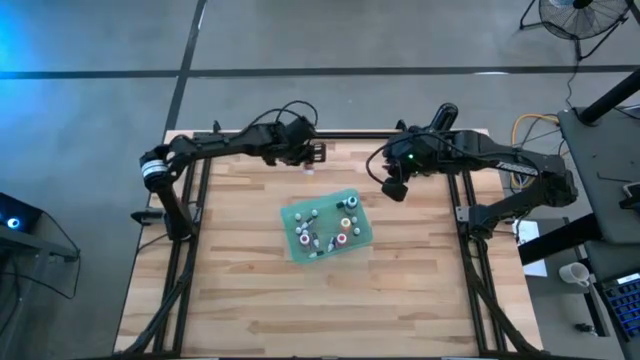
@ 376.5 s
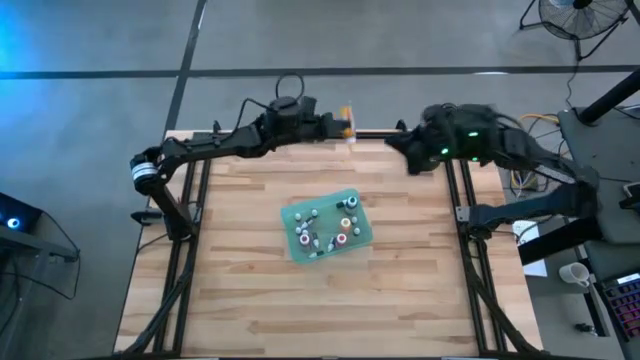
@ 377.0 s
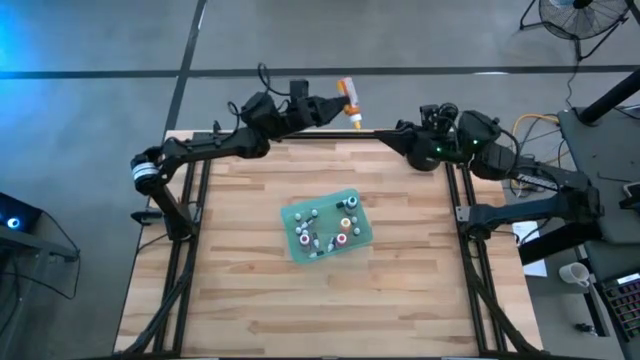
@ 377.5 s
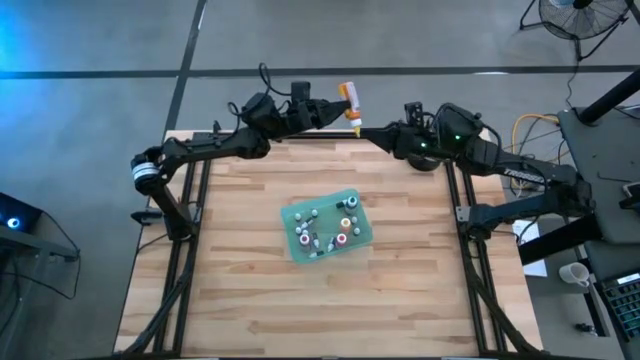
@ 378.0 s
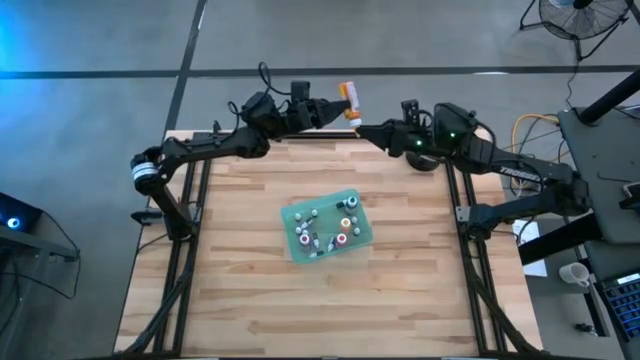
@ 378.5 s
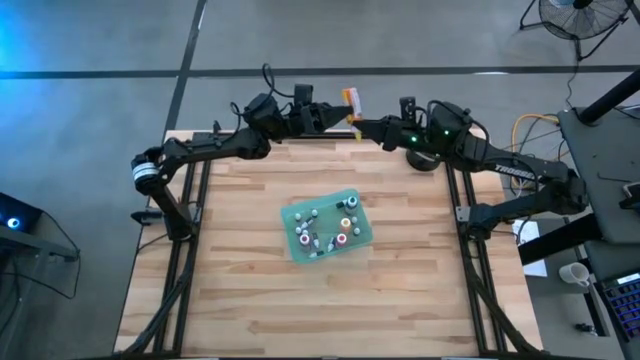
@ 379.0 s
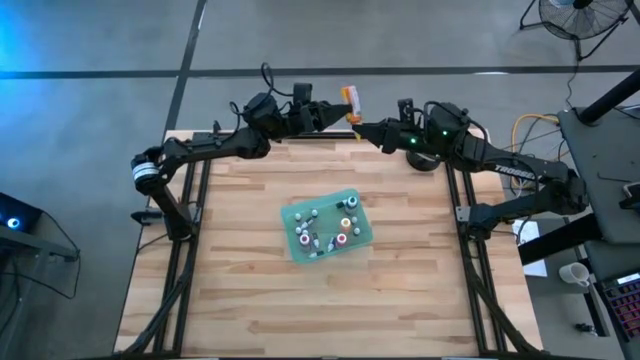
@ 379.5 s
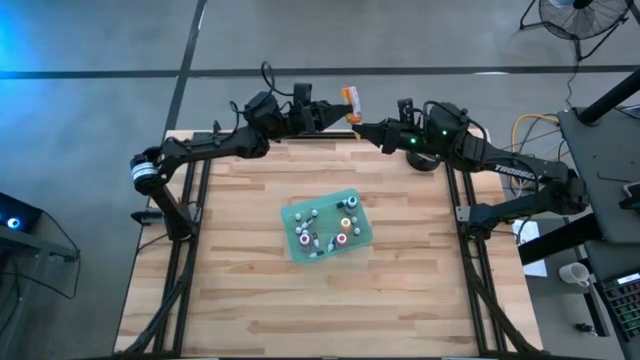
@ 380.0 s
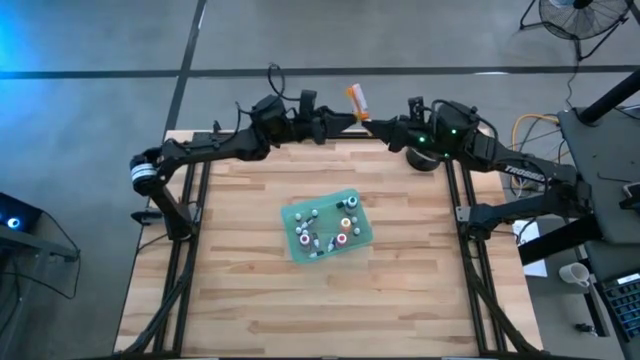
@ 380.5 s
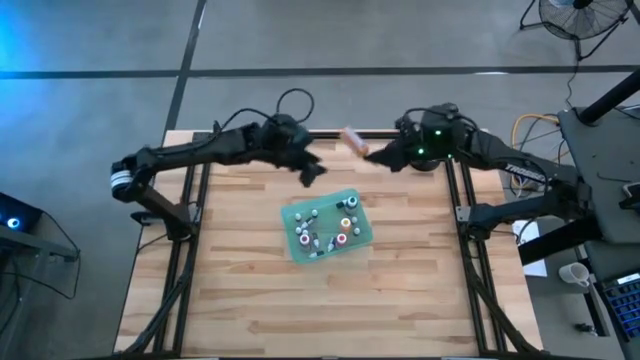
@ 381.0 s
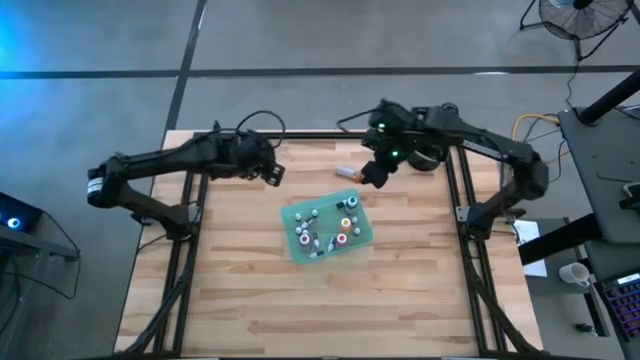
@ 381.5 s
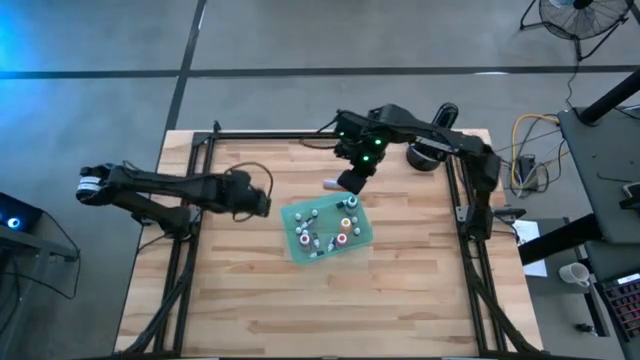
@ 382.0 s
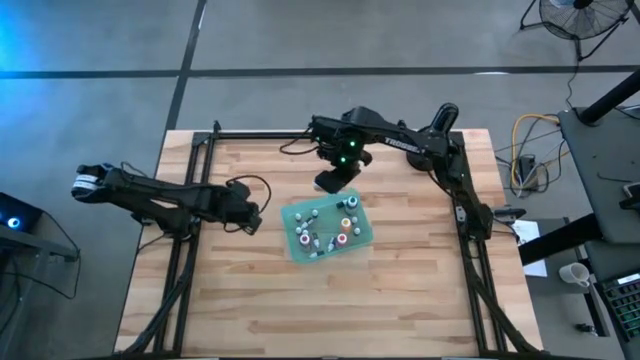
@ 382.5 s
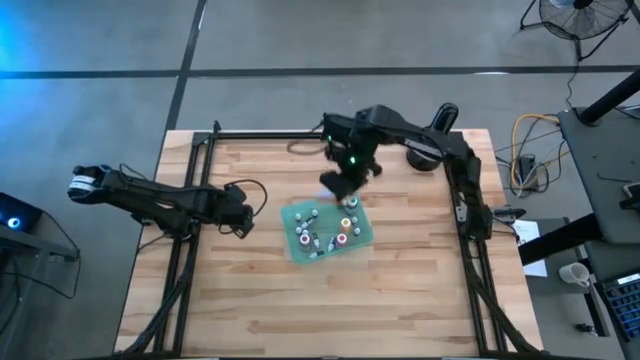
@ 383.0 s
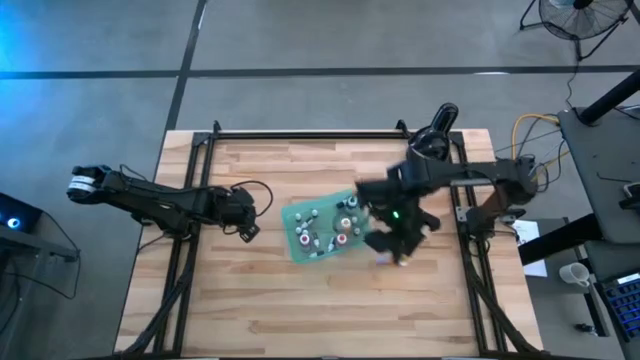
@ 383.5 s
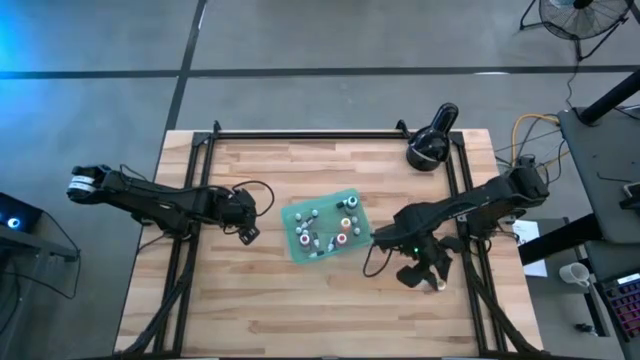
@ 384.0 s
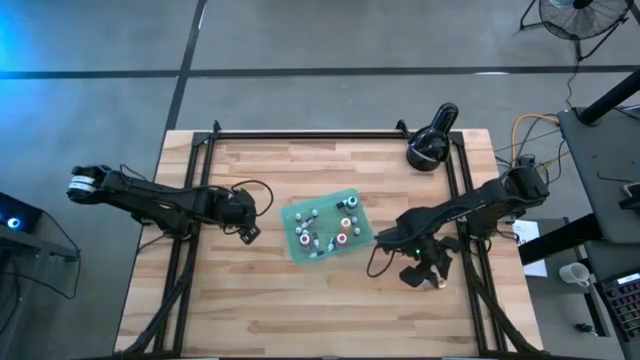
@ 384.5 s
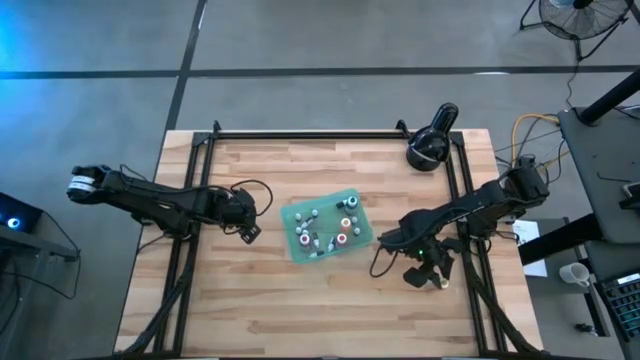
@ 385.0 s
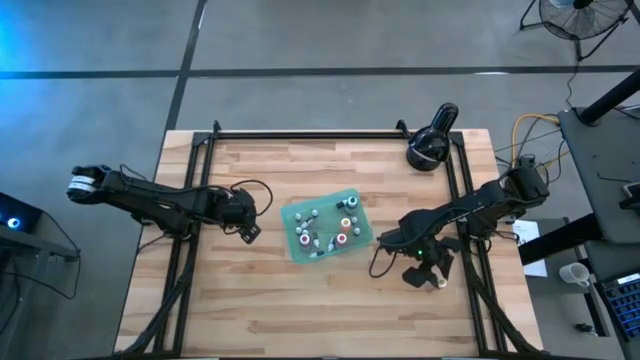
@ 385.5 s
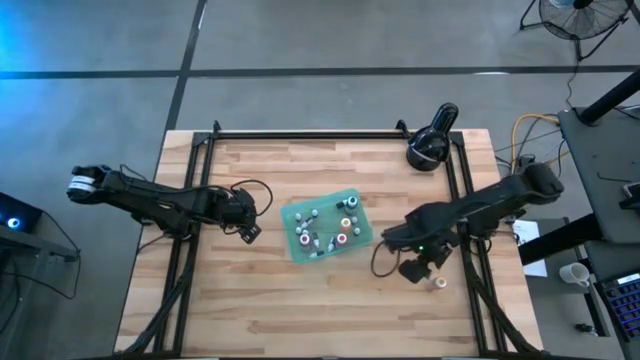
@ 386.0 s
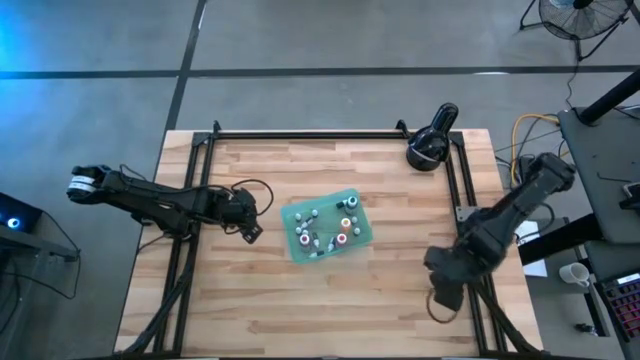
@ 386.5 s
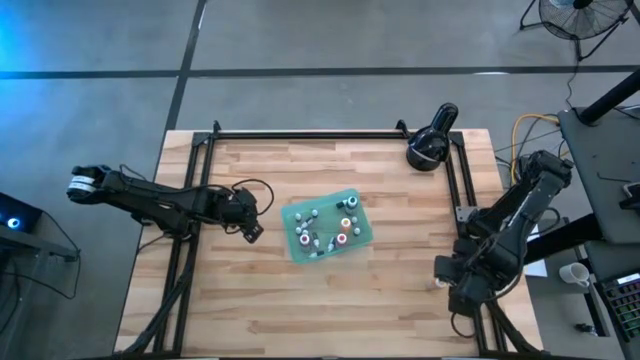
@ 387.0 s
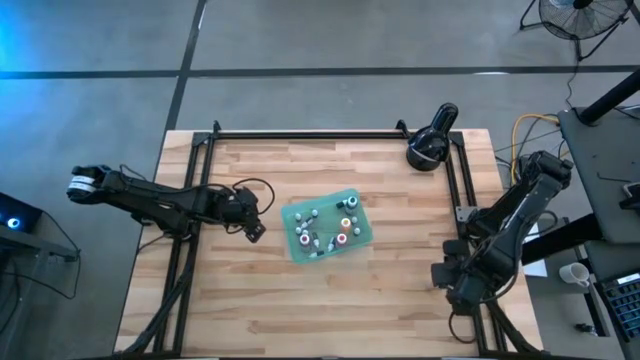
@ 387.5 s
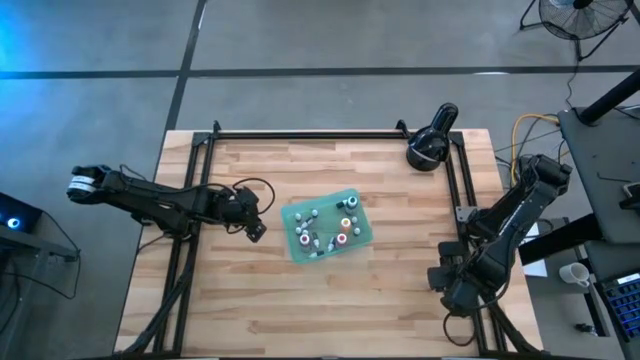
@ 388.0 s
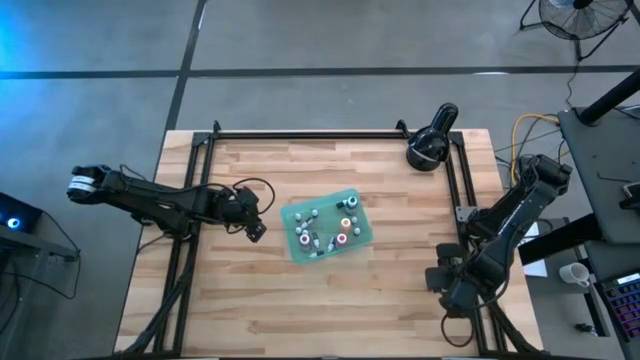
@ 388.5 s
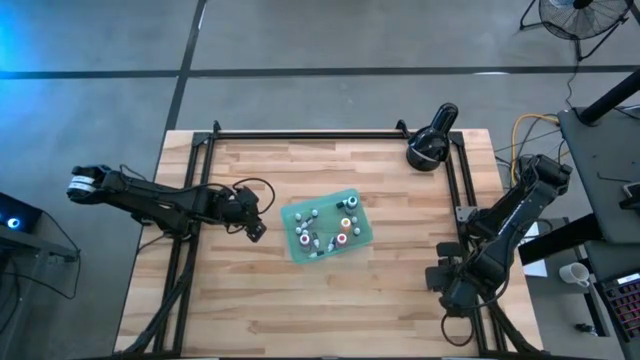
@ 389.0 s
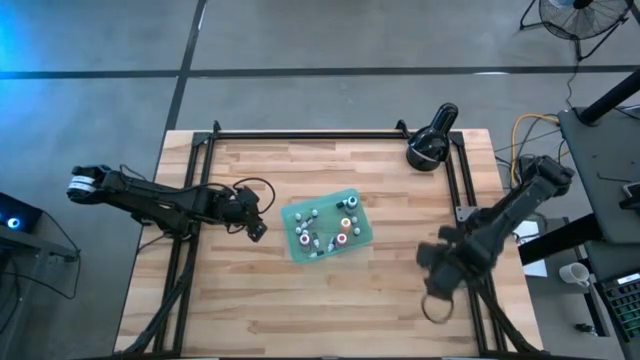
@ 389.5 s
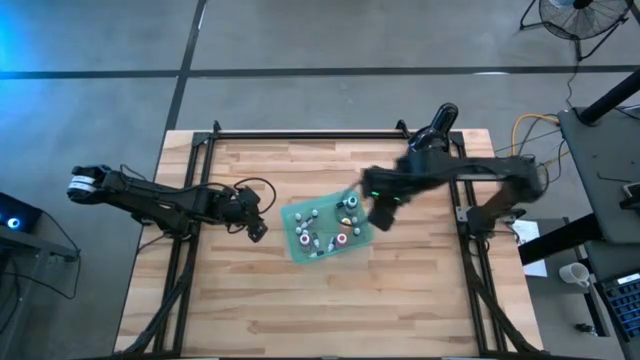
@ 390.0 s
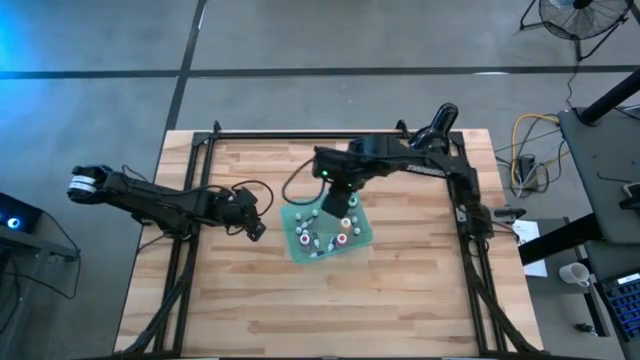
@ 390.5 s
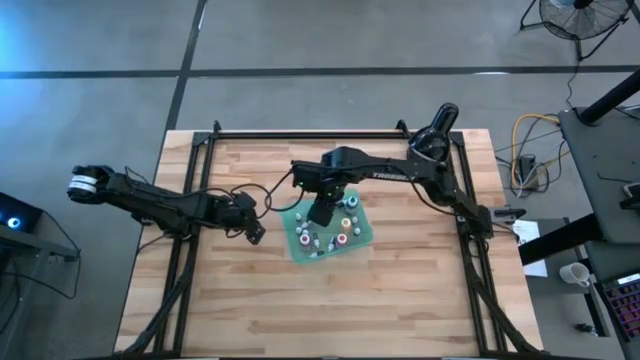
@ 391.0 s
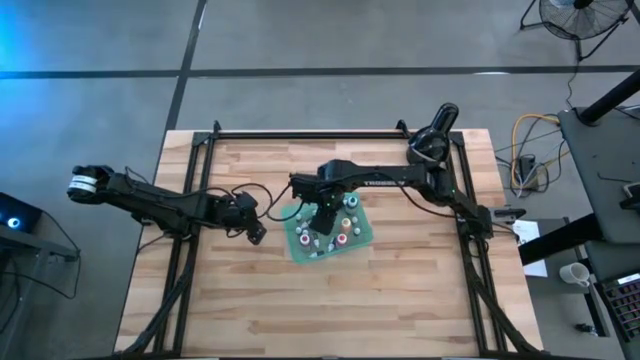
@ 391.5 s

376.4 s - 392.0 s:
Task: Pick & Place food coloring
Put the orange big food coloring into the green bin

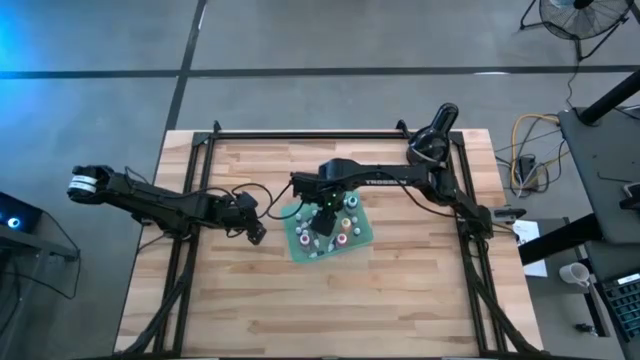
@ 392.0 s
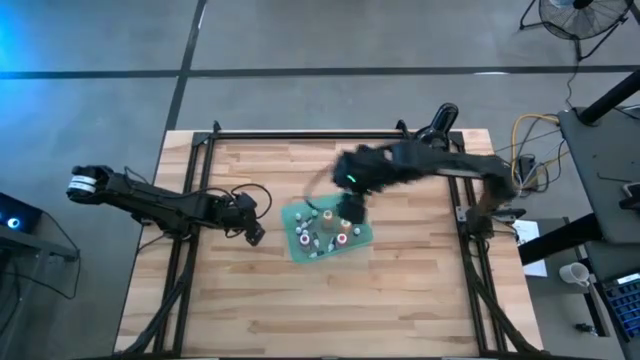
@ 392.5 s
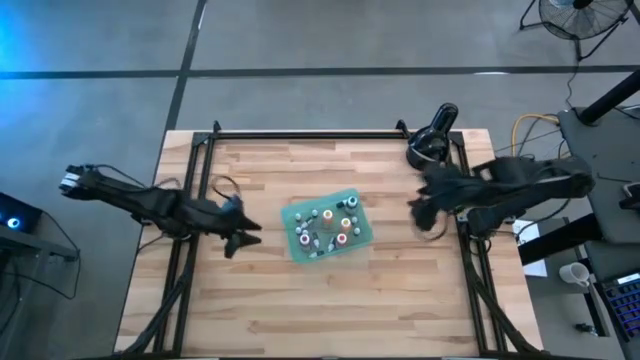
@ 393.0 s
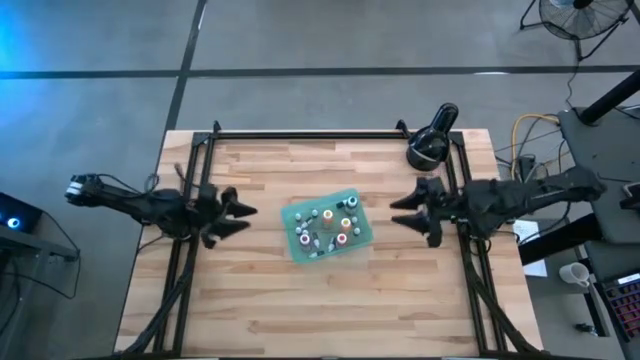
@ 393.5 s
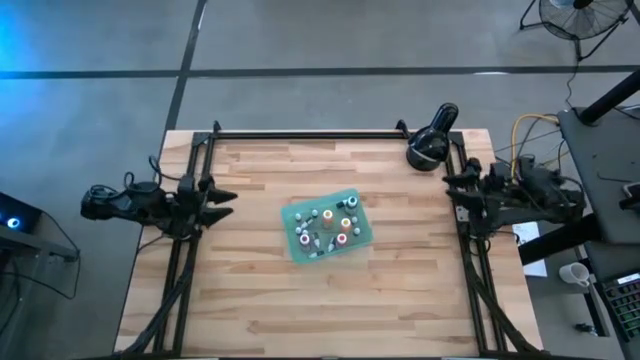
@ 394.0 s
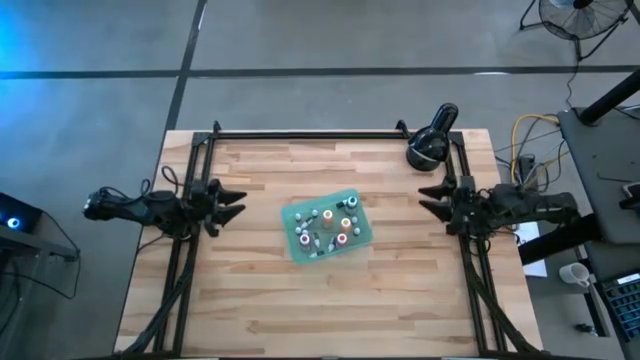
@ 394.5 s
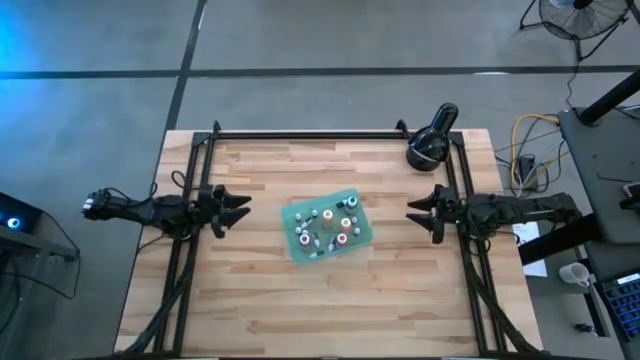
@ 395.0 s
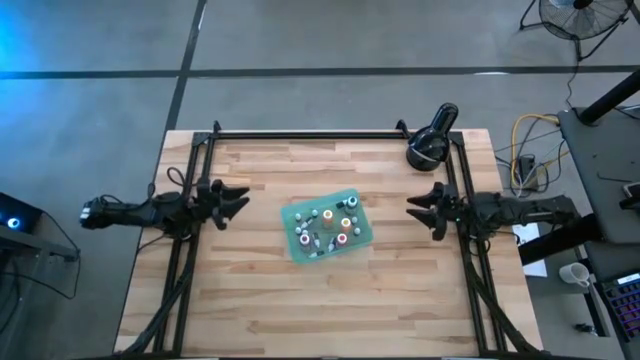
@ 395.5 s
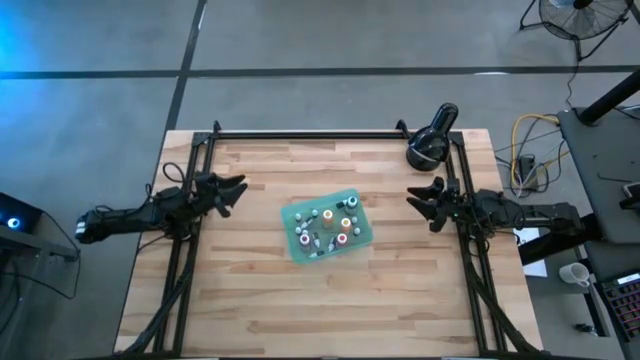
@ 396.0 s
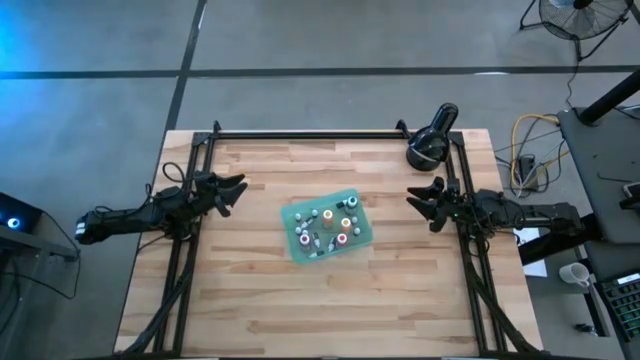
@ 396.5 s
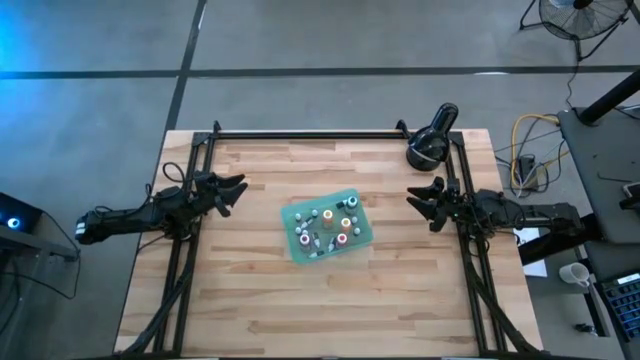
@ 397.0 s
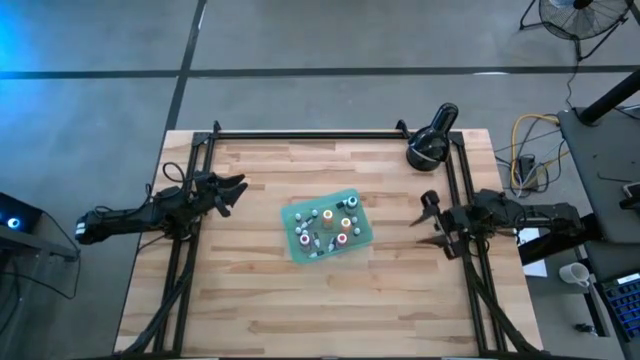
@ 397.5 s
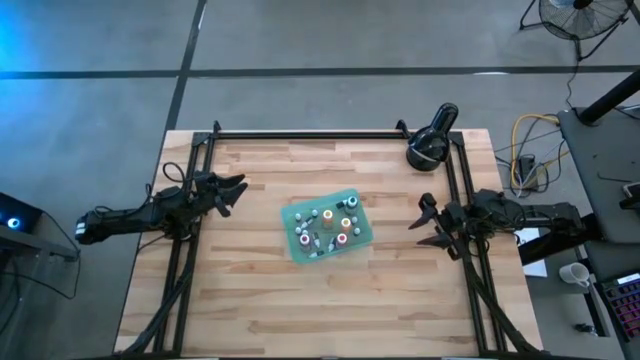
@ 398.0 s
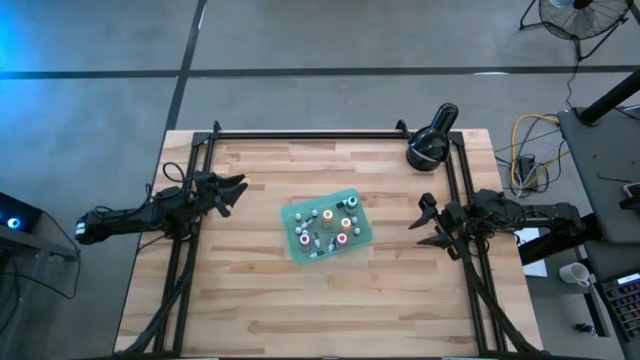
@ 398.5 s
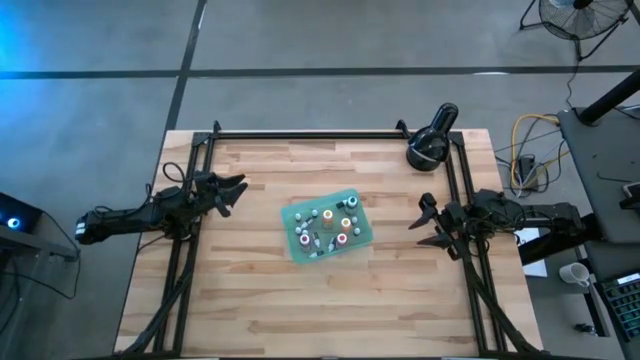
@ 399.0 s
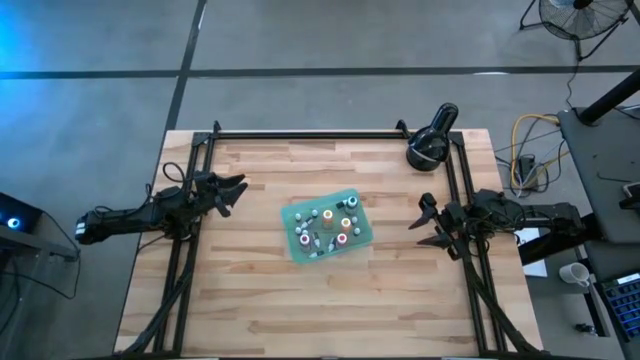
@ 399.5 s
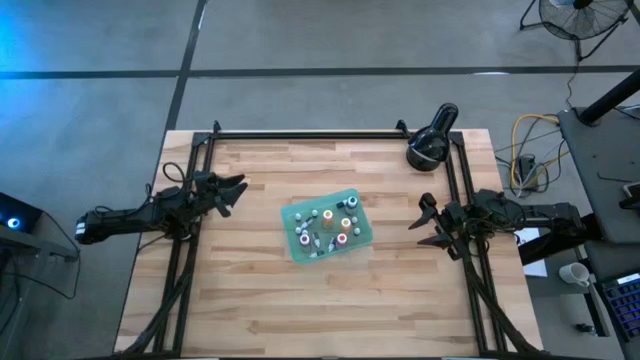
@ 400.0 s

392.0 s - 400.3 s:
Put the yellow big food coloring into the green bin
